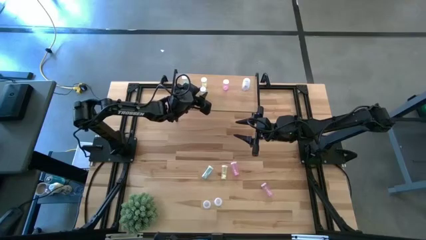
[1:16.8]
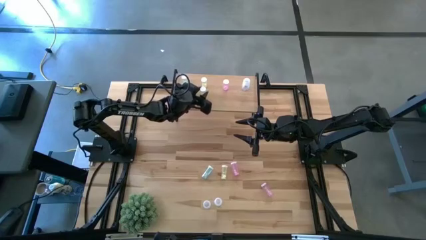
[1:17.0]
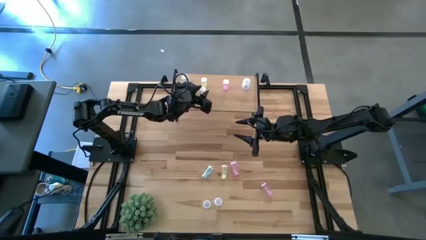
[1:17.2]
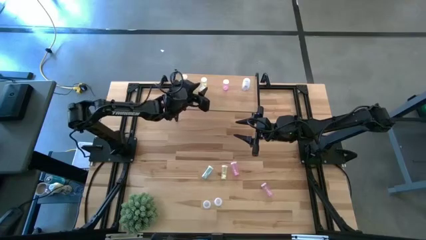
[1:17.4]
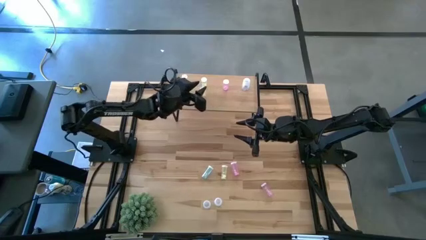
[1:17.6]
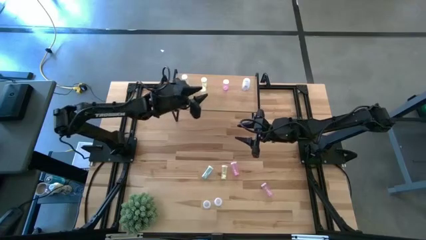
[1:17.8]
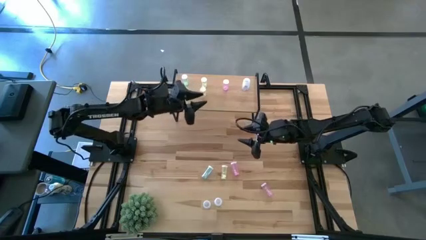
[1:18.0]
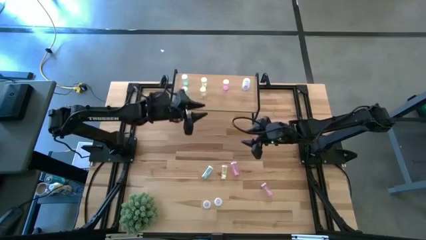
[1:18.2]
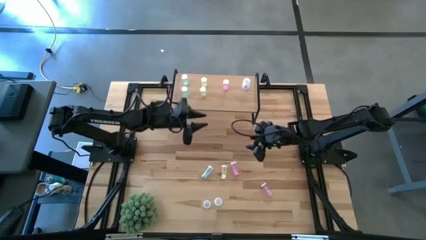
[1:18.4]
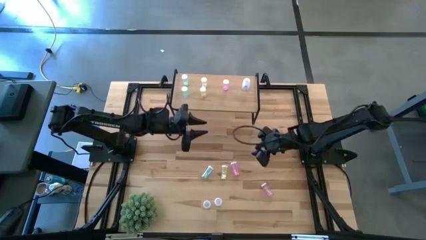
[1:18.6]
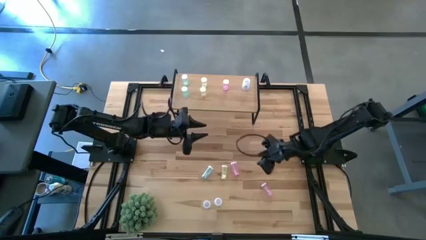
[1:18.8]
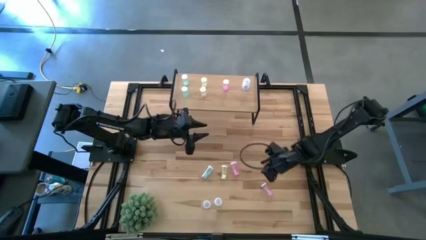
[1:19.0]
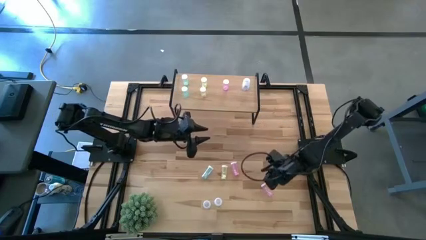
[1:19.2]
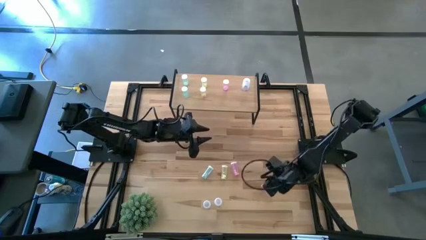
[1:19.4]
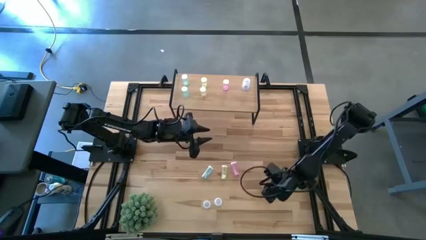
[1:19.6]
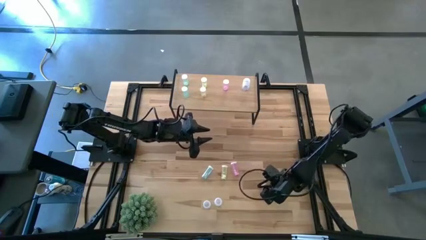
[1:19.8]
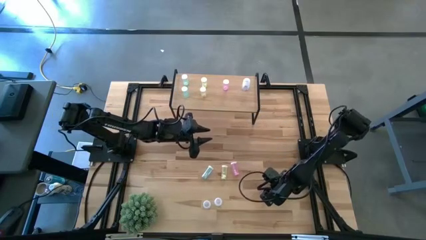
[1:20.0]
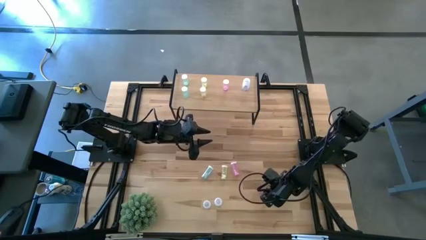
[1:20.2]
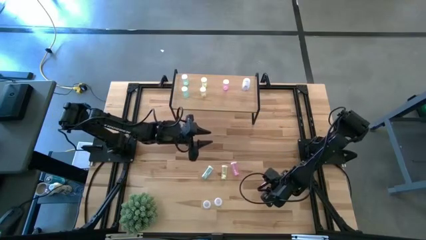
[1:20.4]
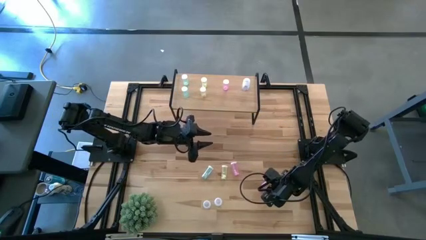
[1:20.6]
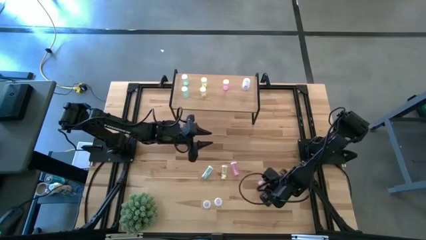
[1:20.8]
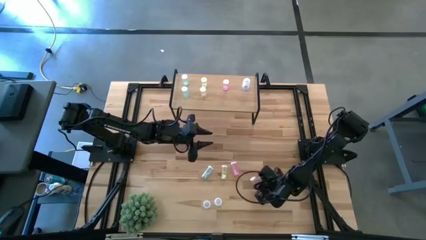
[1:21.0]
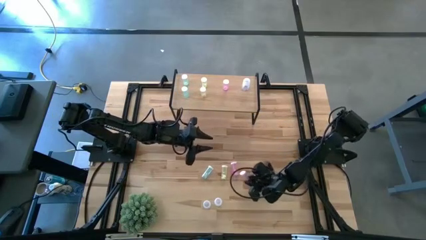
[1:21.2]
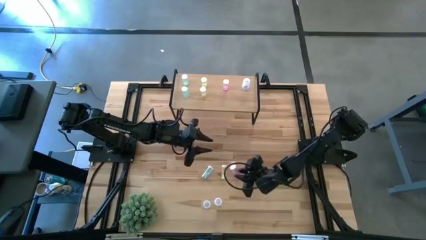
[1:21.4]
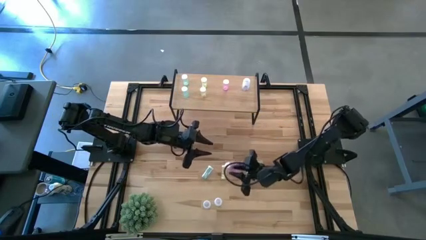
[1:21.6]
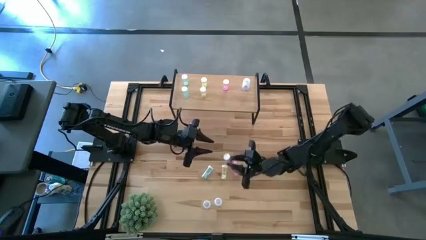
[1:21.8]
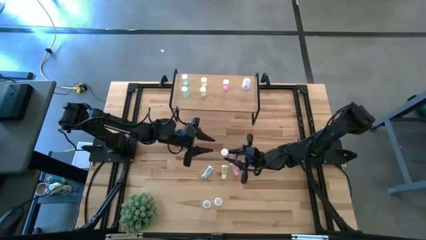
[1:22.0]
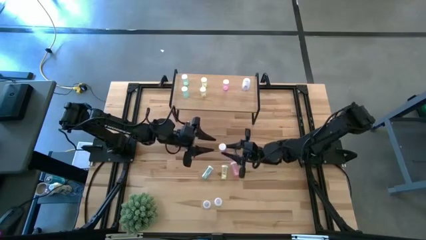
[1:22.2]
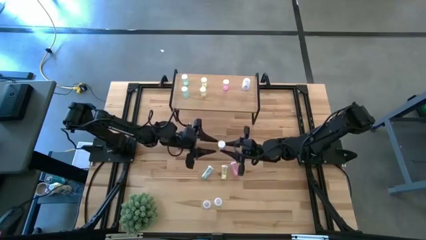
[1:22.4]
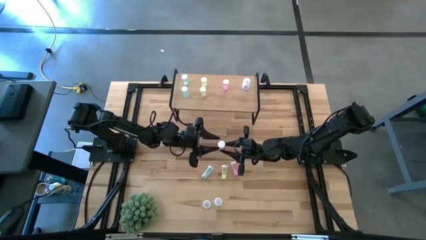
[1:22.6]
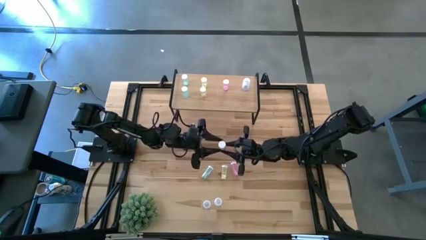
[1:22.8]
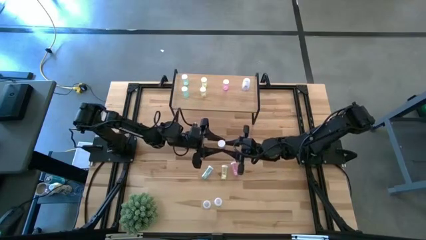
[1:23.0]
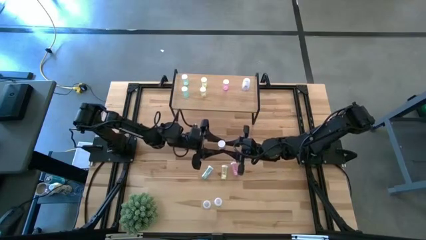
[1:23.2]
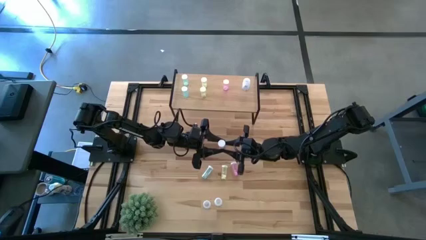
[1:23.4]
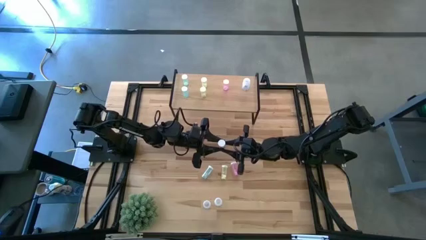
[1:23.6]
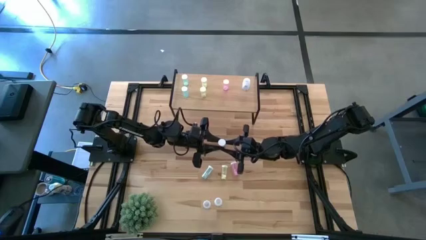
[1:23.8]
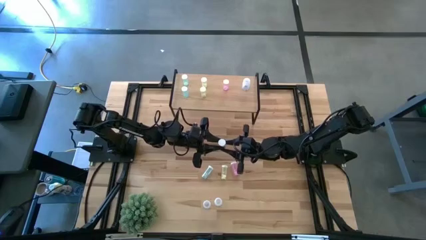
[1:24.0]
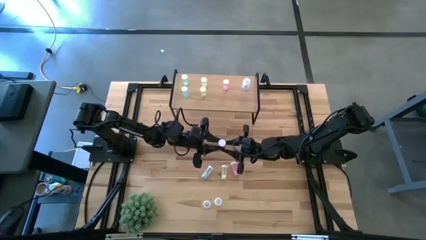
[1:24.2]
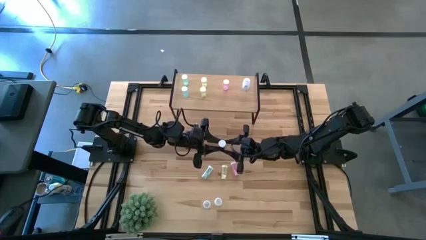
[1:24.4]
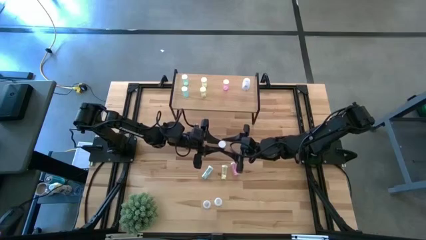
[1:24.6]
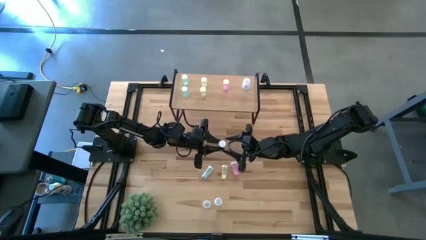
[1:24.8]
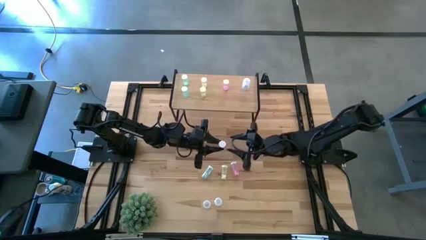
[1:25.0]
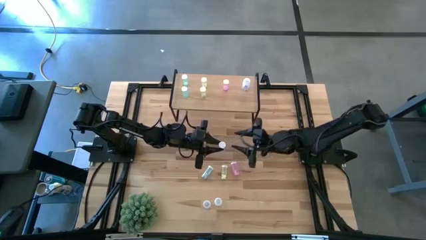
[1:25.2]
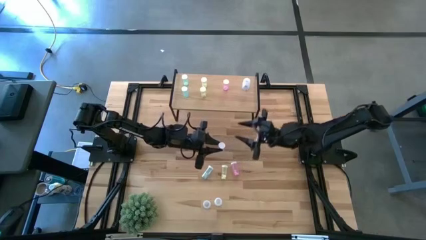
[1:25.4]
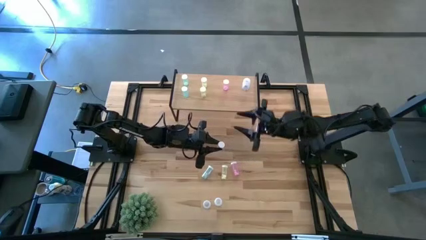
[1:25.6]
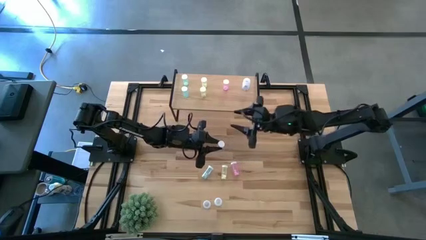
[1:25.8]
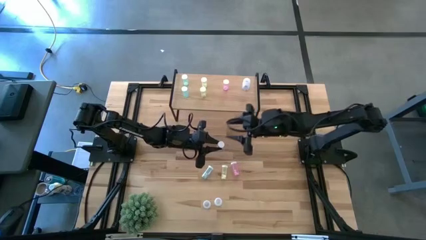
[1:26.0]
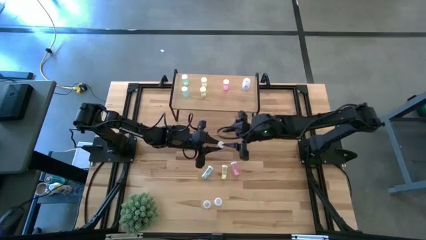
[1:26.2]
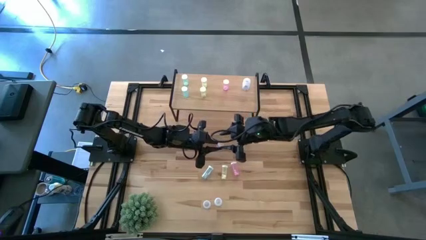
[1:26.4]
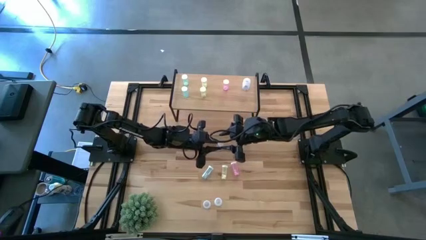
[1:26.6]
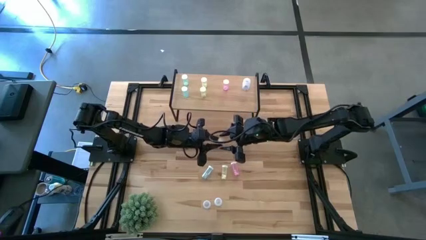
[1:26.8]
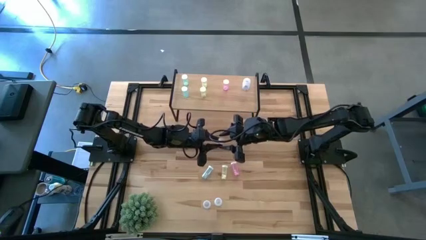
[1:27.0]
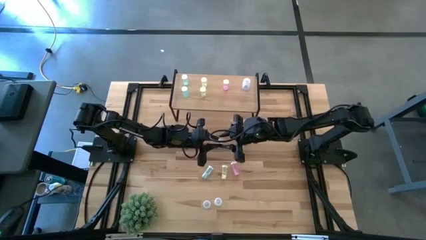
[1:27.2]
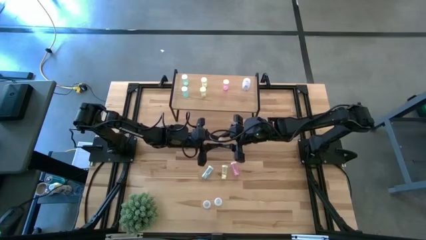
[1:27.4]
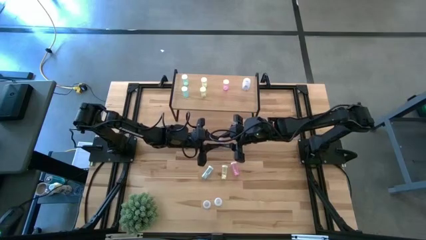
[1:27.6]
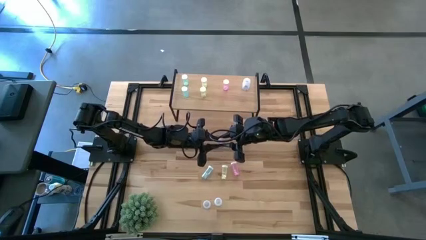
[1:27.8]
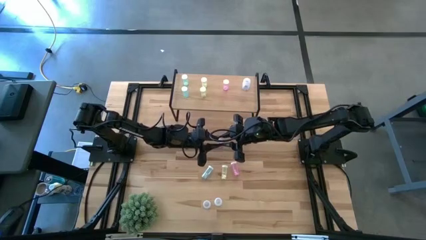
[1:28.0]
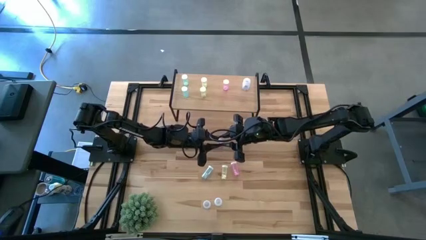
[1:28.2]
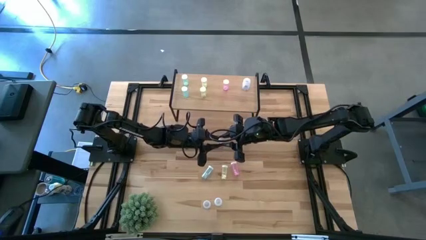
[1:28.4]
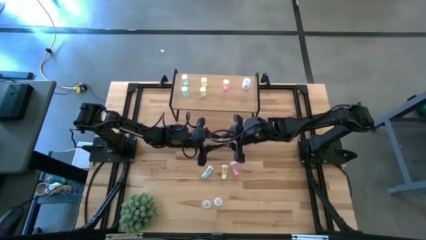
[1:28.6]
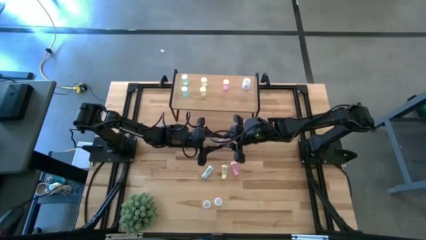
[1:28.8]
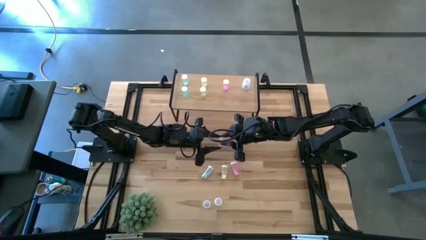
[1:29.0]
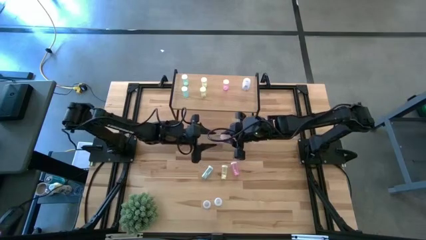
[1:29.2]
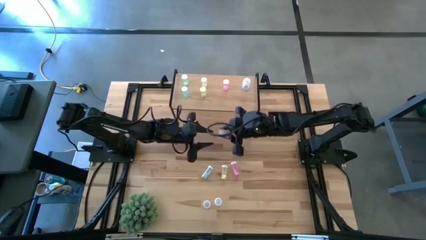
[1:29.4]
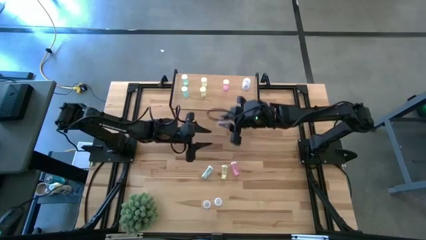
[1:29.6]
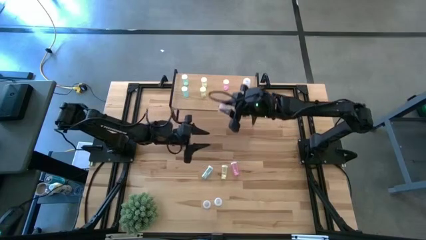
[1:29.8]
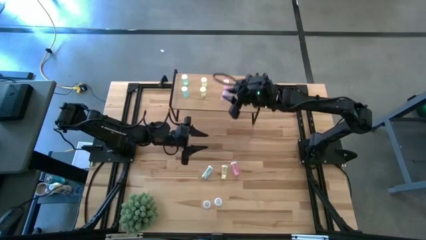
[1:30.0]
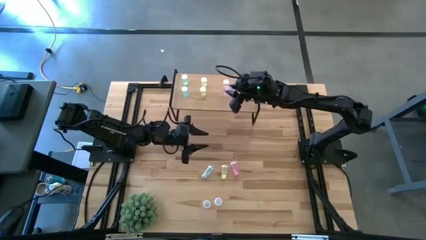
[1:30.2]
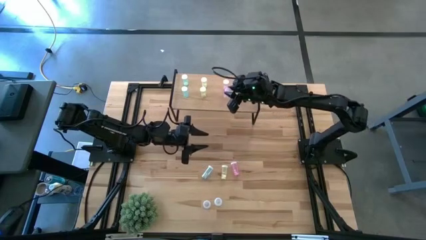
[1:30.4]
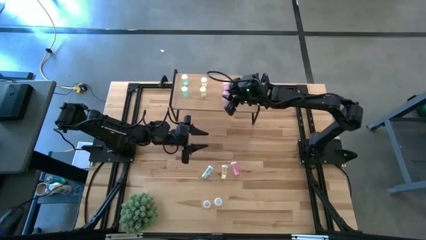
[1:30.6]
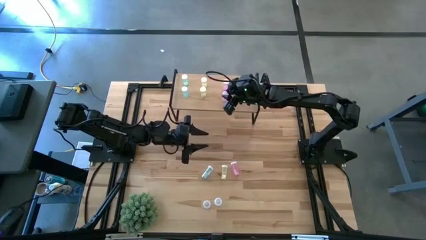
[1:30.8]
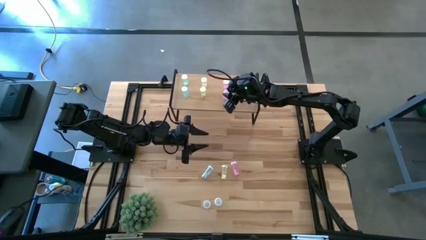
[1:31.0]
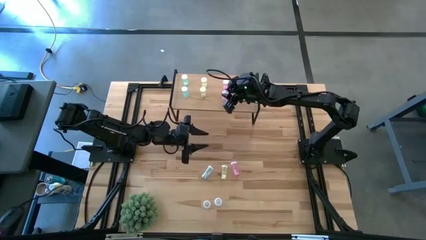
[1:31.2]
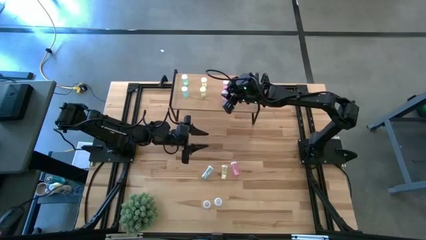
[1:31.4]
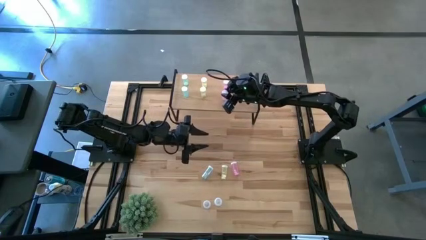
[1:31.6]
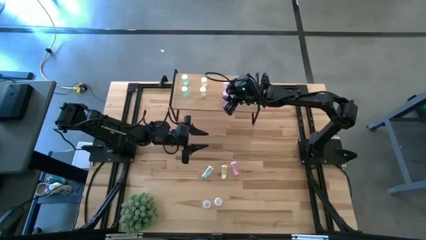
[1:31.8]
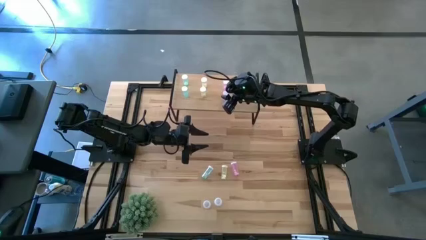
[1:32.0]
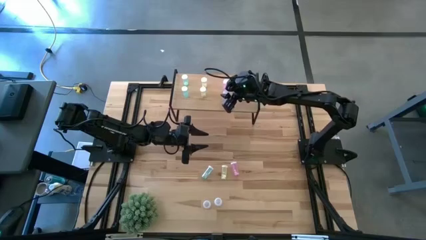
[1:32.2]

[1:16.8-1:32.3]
Task: Pick and place medicine bottles onto shelf by color
Put the bottom pink pill bottle on the shelf aligned with the other pink pill bottle
